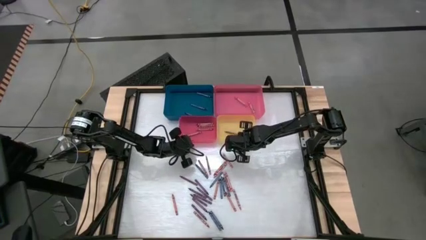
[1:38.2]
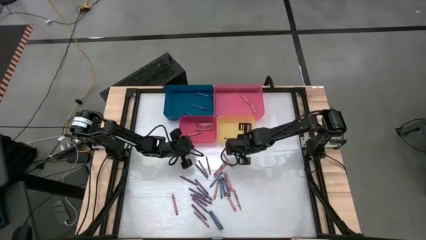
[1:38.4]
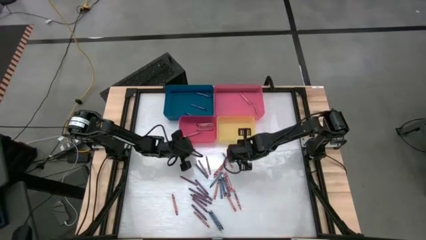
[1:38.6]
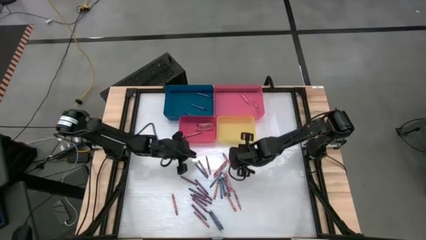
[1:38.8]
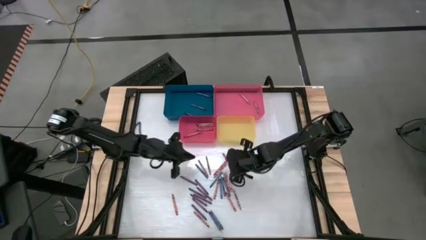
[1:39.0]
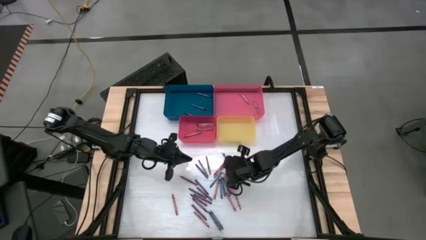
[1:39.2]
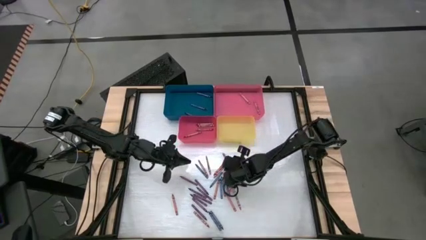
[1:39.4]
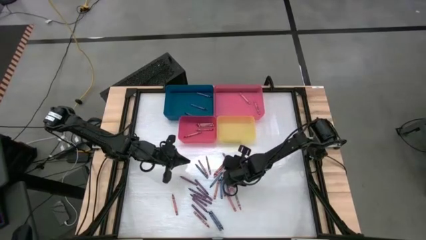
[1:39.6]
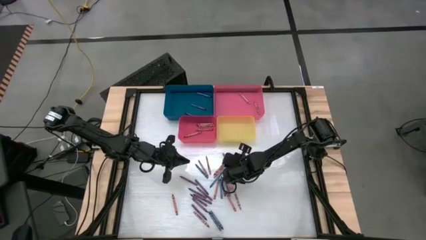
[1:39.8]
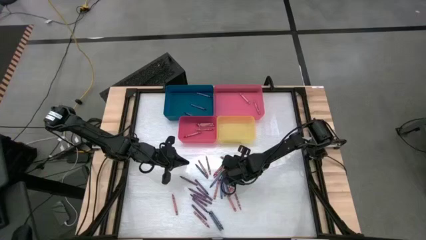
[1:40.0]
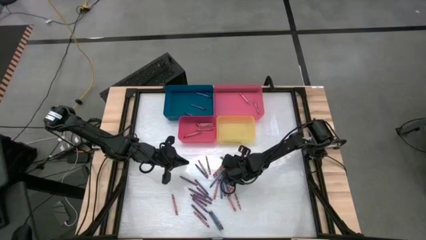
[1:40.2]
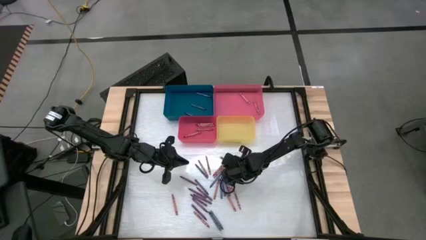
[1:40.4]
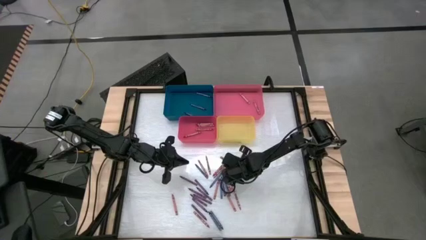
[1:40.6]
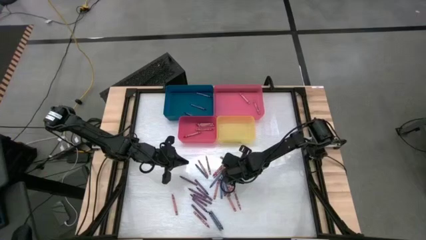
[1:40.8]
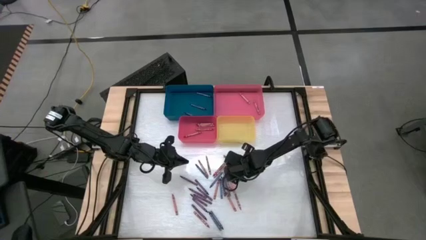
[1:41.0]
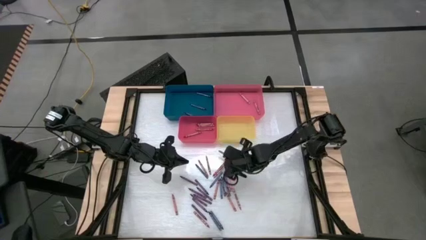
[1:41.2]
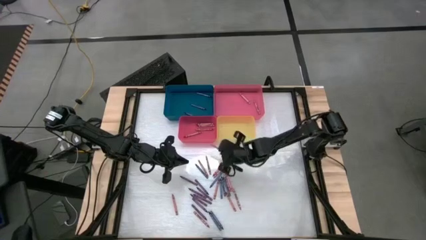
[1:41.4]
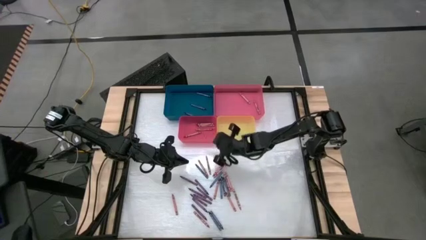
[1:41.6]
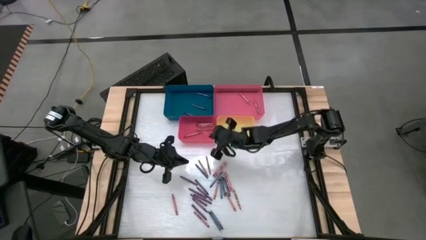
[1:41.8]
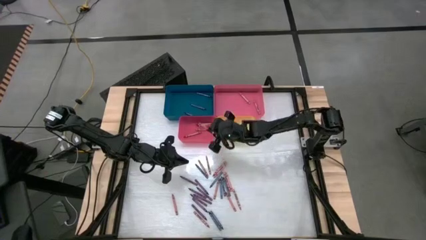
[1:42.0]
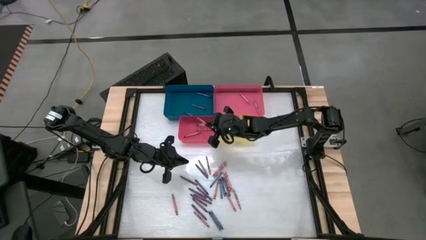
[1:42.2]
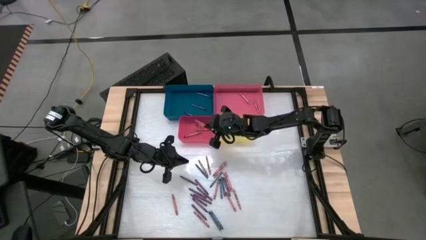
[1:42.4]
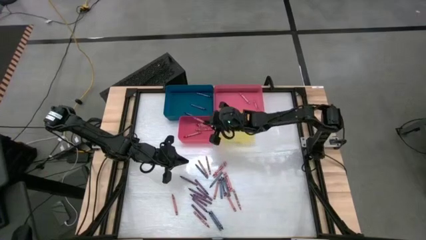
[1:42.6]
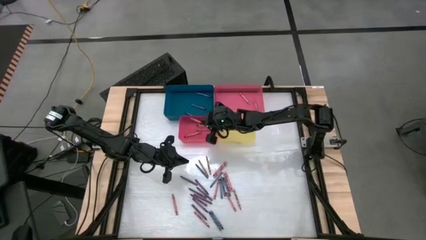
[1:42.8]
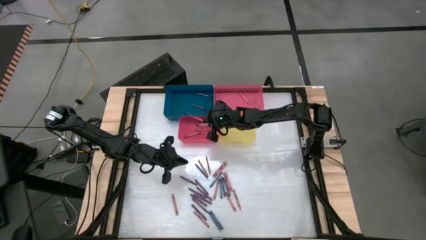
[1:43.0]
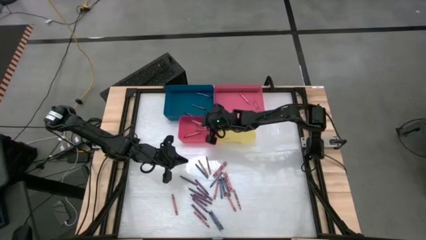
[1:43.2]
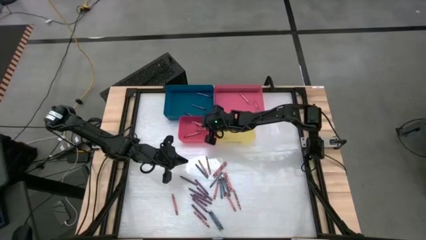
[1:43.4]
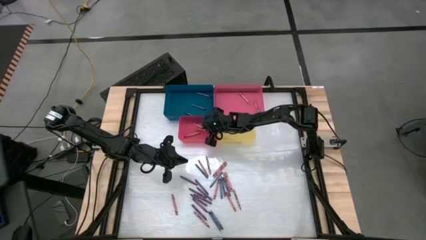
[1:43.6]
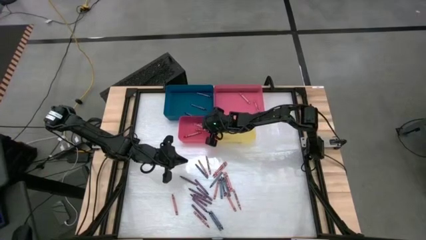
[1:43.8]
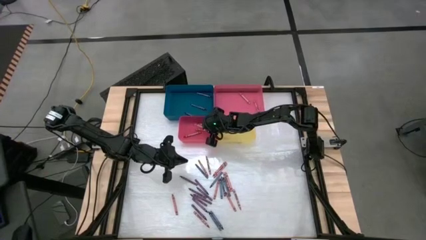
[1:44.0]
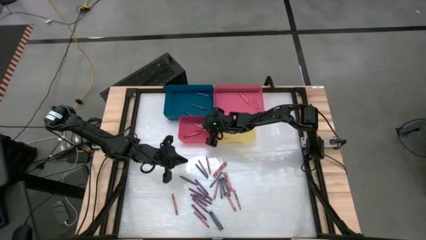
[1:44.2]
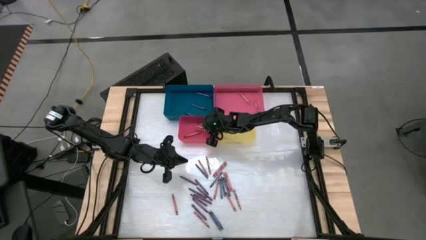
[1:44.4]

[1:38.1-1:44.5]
Task: Sort crayons
Put the red crayon into the red bin

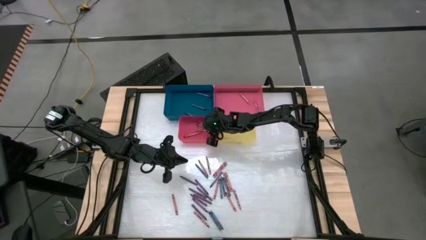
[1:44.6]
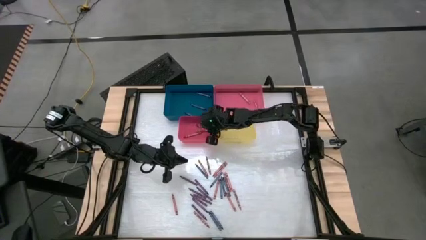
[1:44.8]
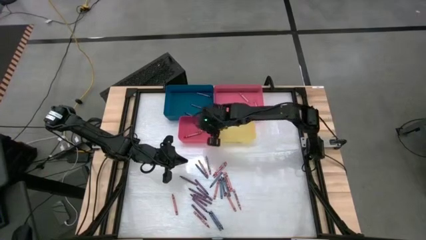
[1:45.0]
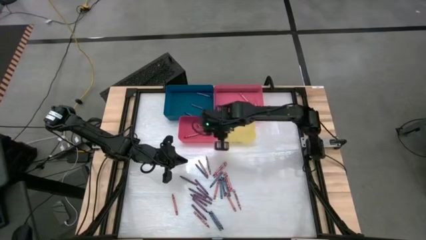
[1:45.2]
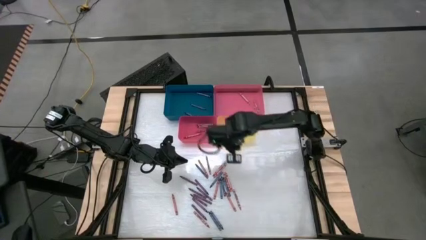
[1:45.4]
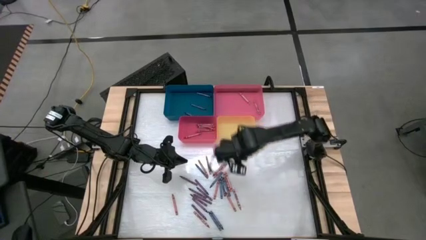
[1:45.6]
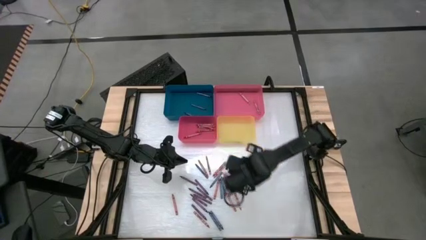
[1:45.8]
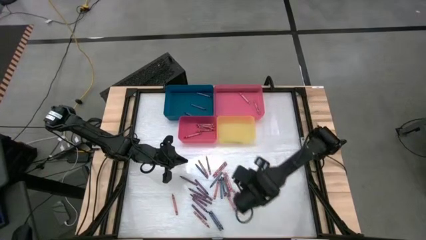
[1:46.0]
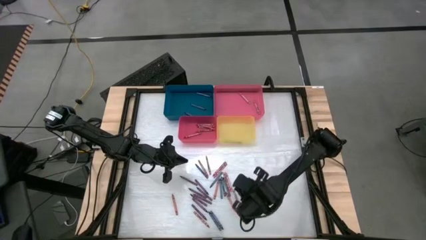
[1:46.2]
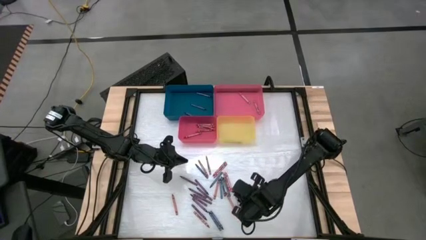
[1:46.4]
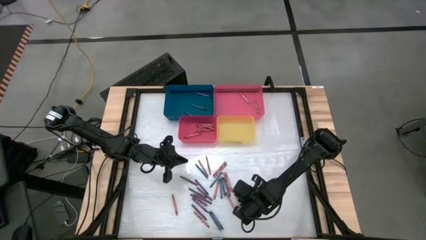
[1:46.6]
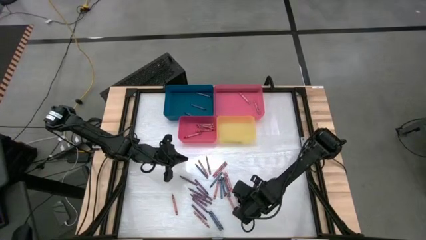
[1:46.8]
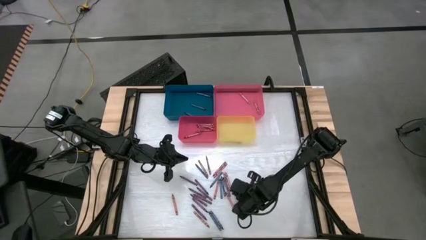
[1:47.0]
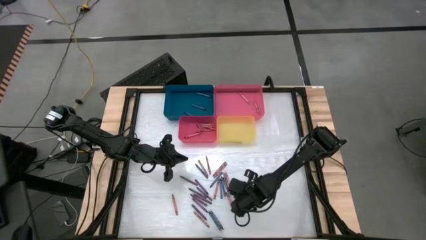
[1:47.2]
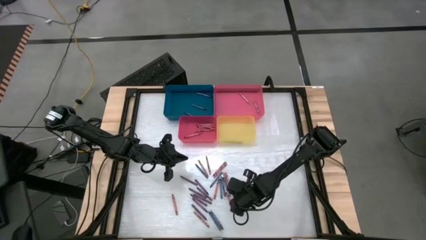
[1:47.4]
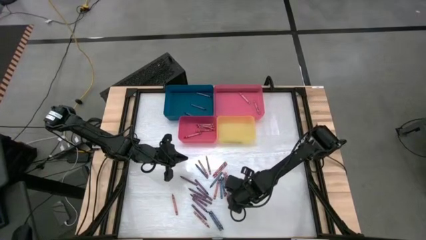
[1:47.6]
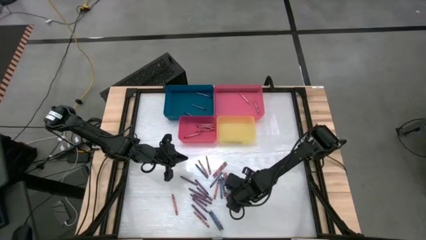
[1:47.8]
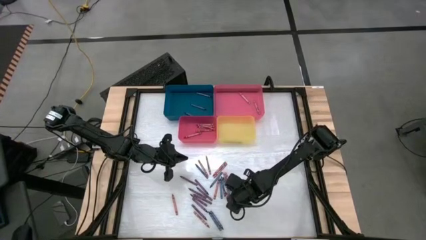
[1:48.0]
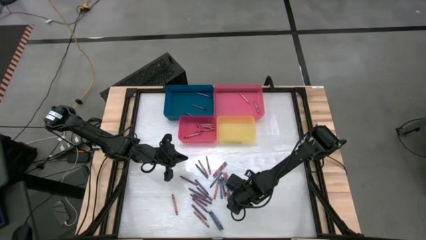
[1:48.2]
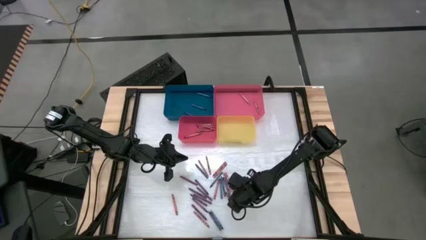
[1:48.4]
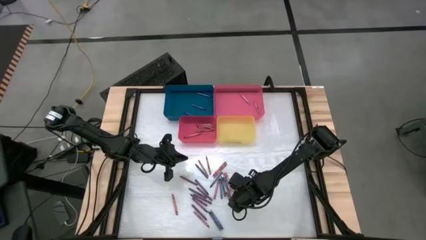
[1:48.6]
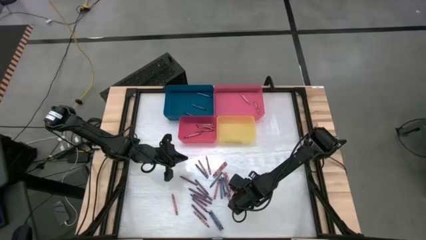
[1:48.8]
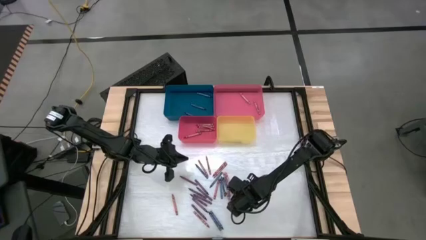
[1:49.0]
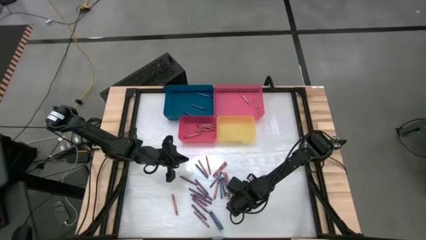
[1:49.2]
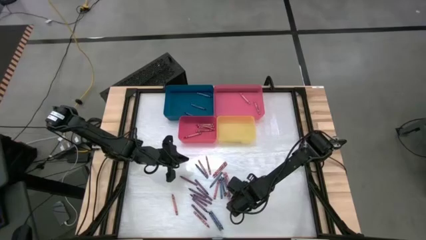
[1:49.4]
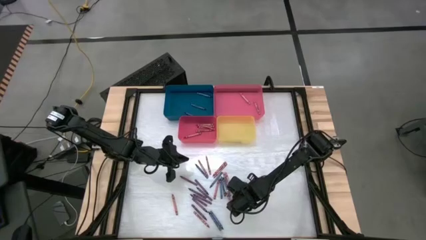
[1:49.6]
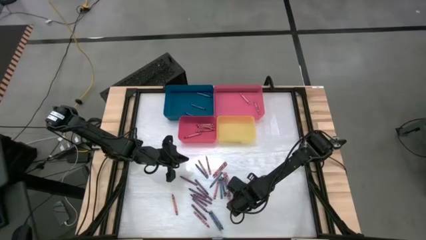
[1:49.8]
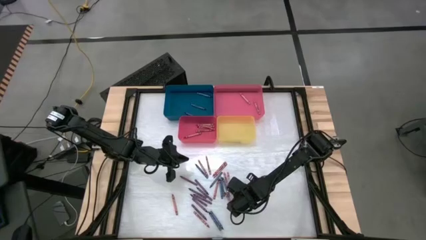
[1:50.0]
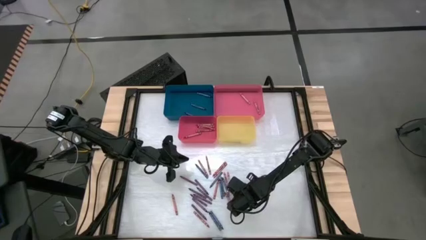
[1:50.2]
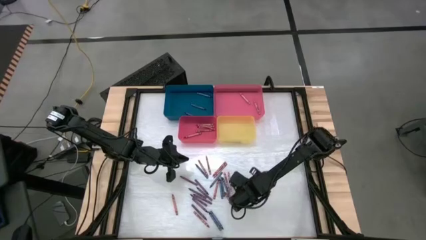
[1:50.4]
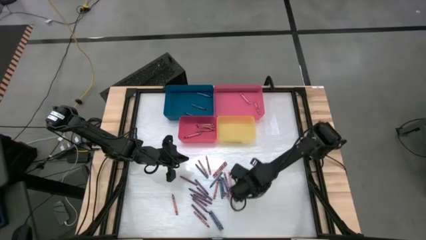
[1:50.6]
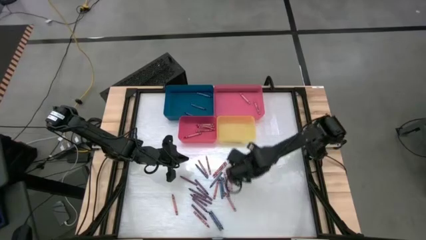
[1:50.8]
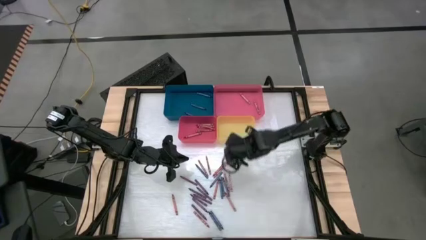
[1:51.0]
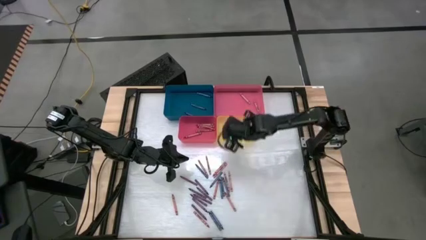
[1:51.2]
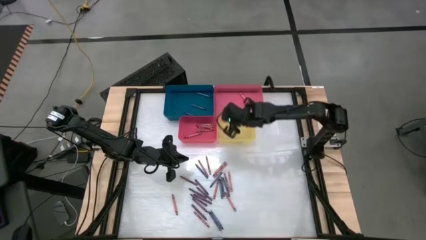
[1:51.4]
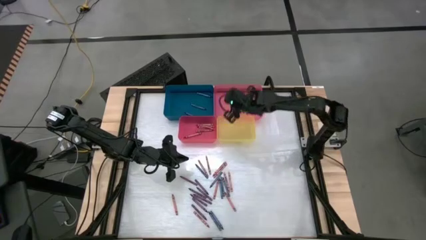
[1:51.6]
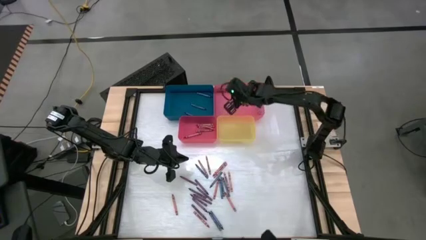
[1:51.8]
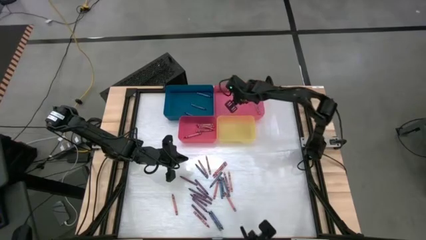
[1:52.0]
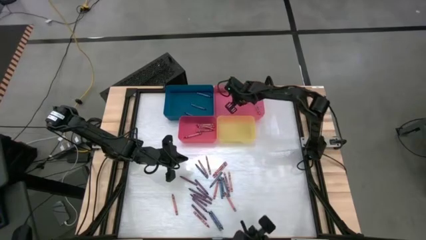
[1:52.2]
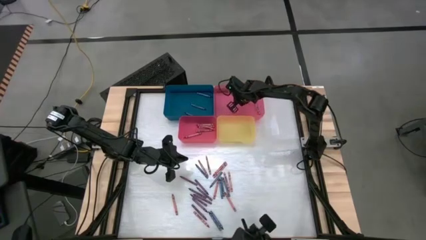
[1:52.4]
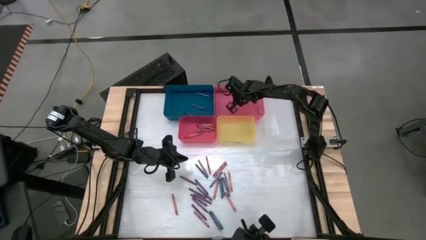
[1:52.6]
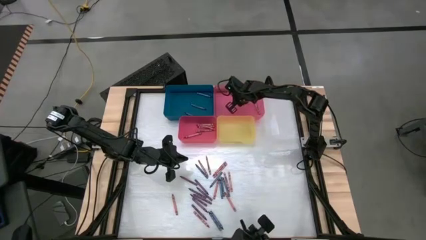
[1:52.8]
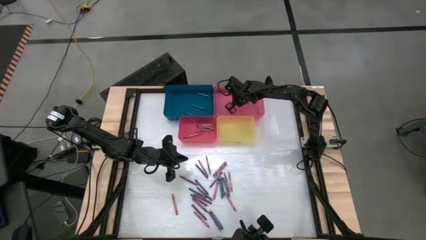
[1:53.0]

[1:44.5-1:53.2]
Put the pink crayon into the pink bin
